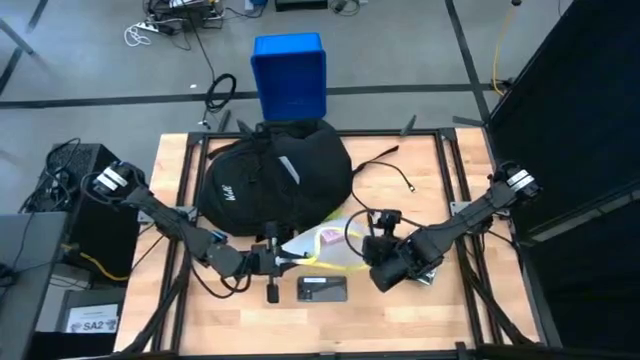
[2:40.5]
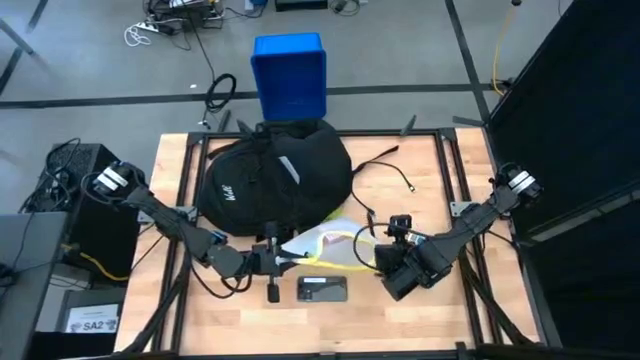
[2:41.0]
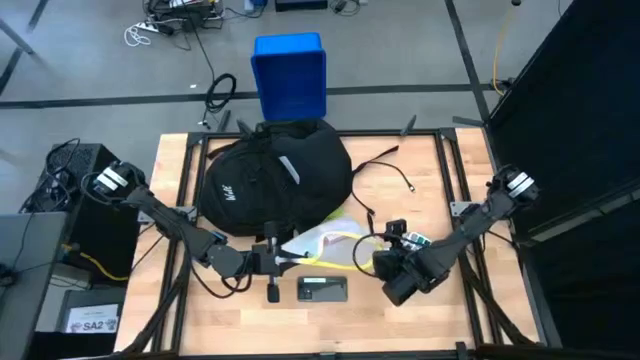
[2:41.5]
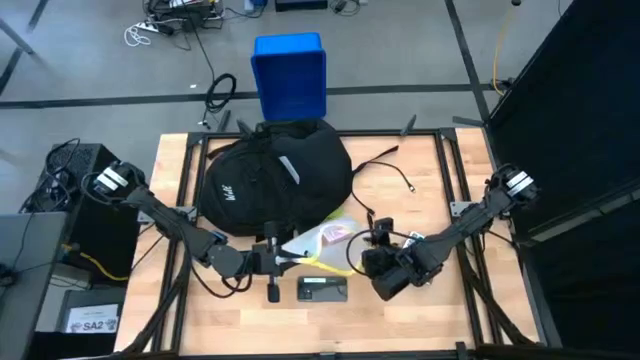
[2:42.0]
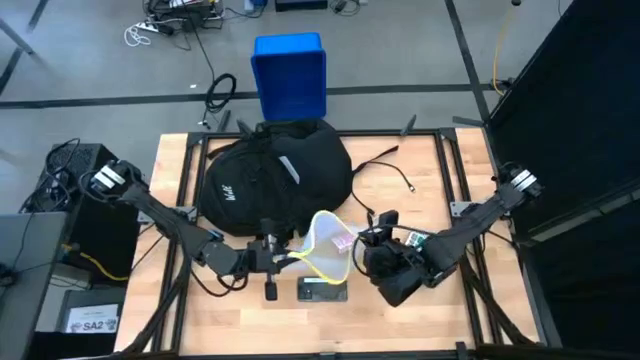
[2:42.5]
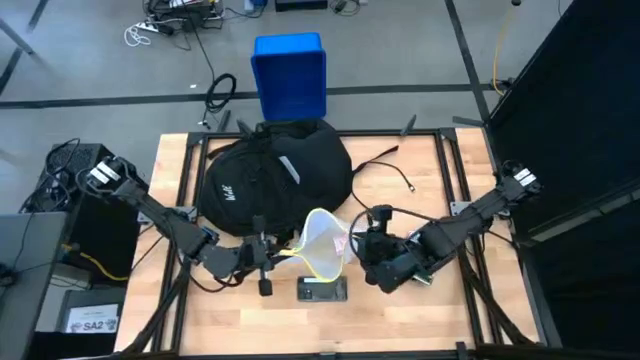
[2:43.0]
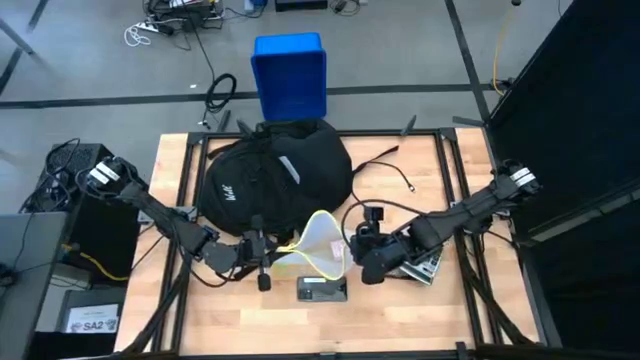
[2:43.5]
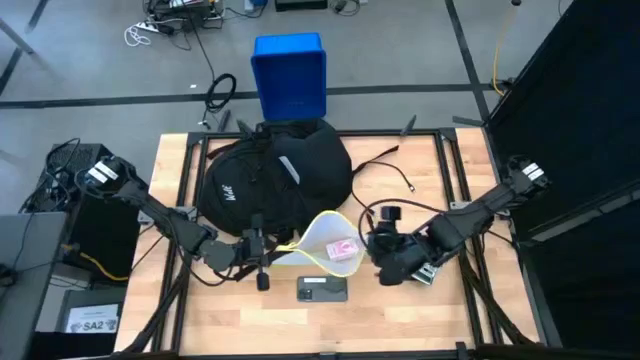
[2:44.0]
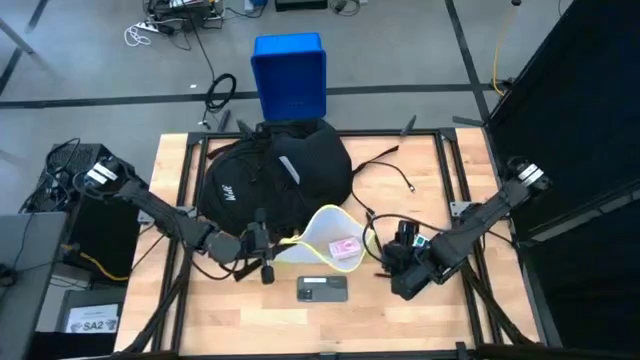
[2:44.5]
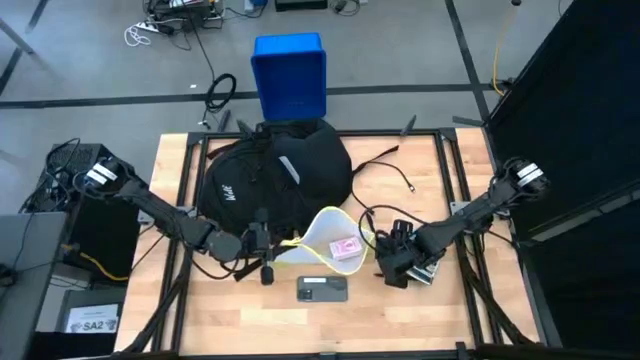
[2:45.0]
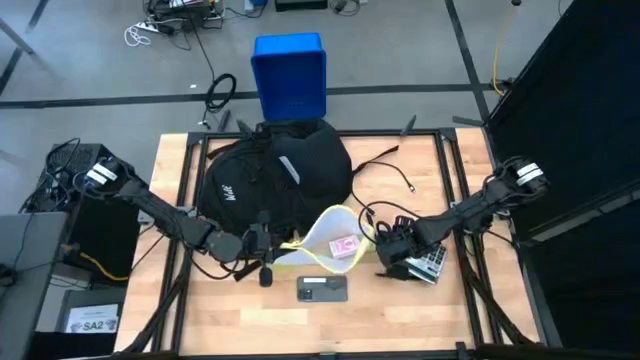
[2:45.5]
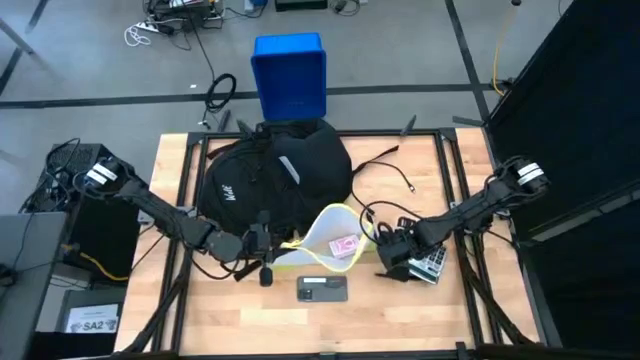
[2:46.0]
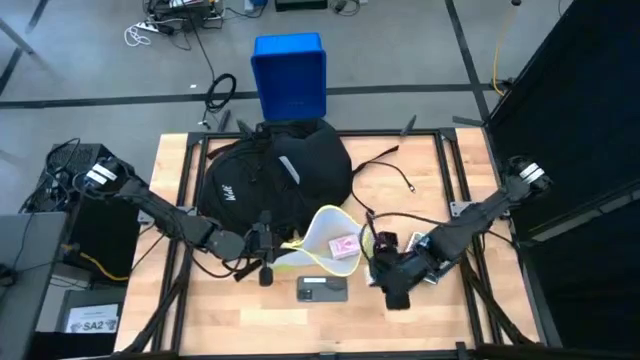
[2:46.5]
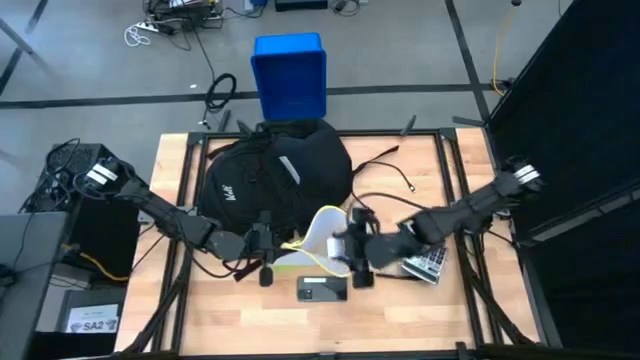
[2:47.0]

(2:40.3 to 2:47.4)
Task: Unpack backpack
Put the charger adapter into the zip bag

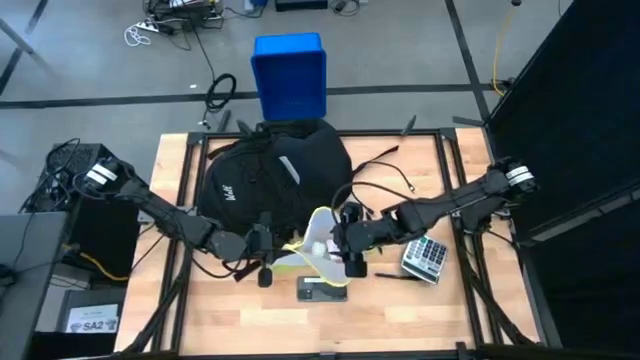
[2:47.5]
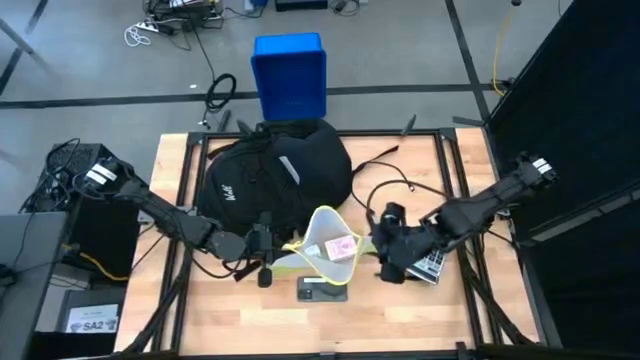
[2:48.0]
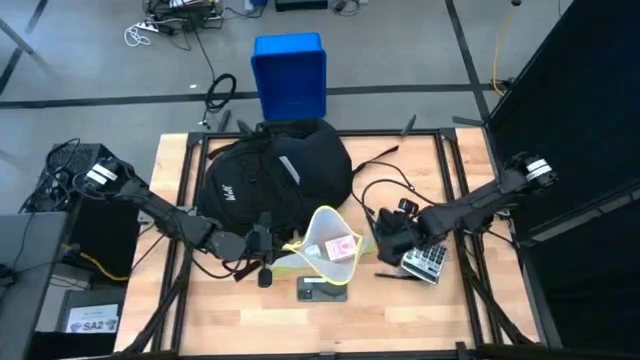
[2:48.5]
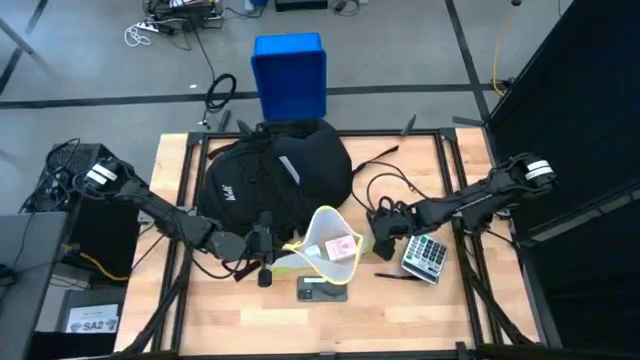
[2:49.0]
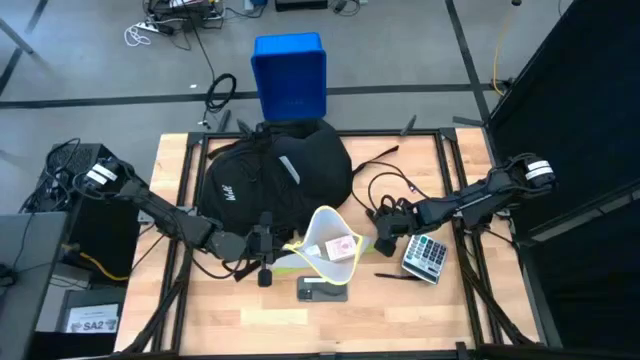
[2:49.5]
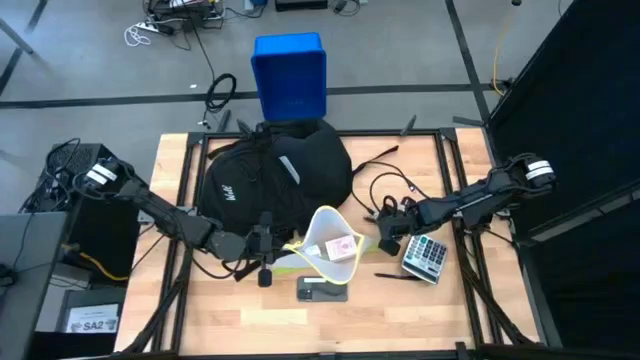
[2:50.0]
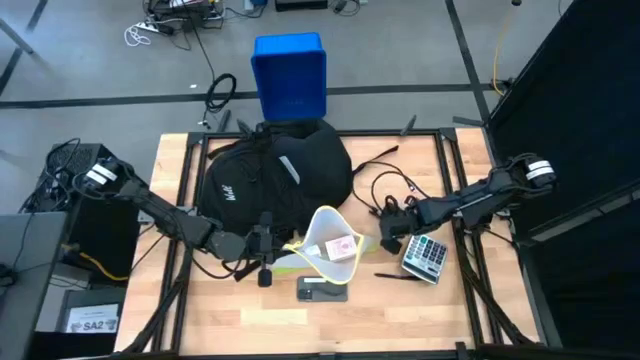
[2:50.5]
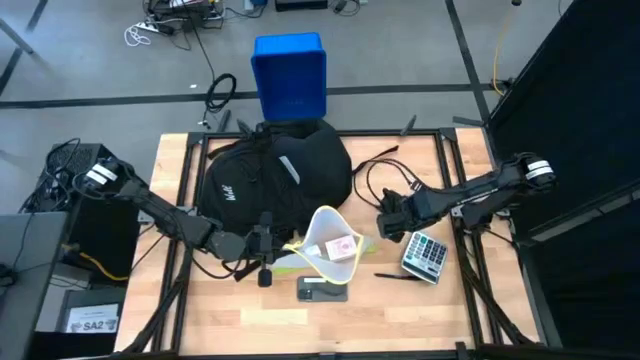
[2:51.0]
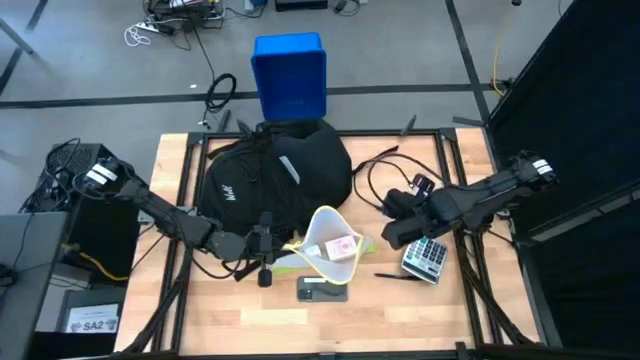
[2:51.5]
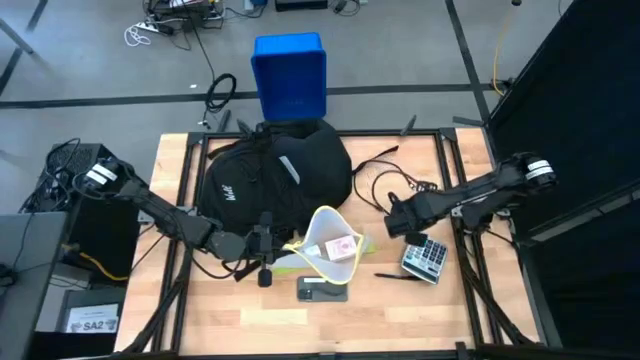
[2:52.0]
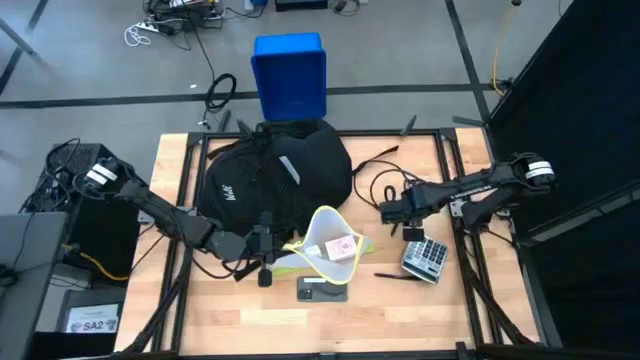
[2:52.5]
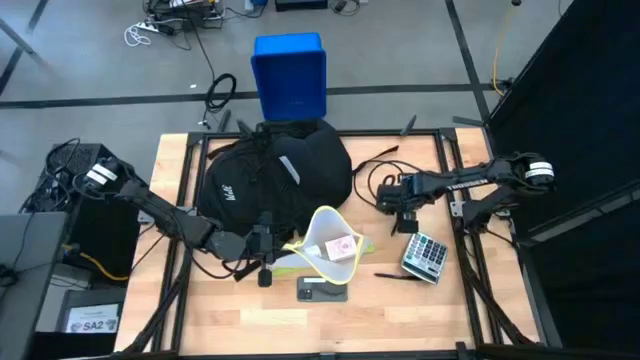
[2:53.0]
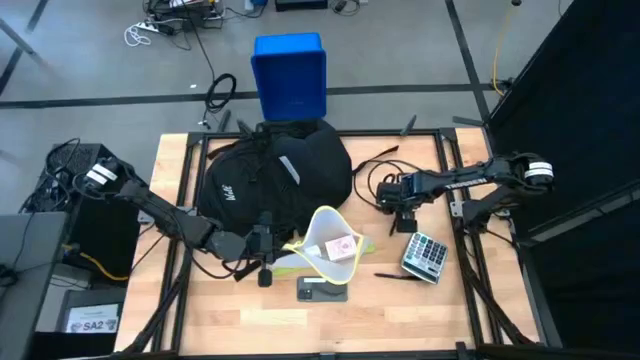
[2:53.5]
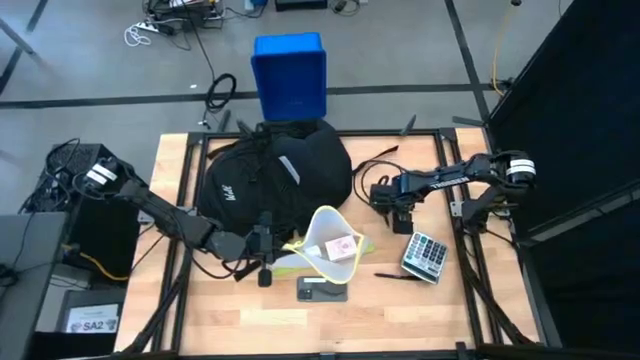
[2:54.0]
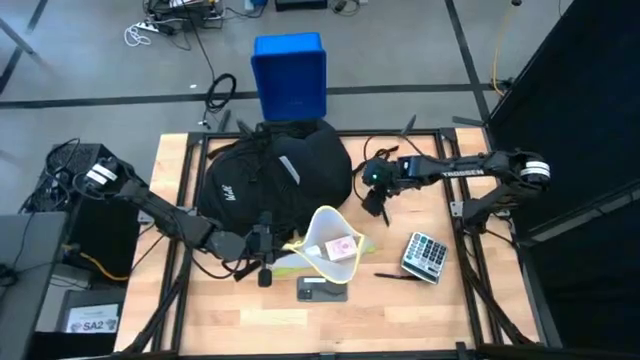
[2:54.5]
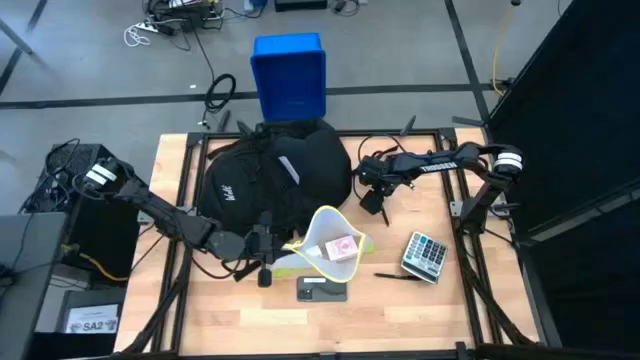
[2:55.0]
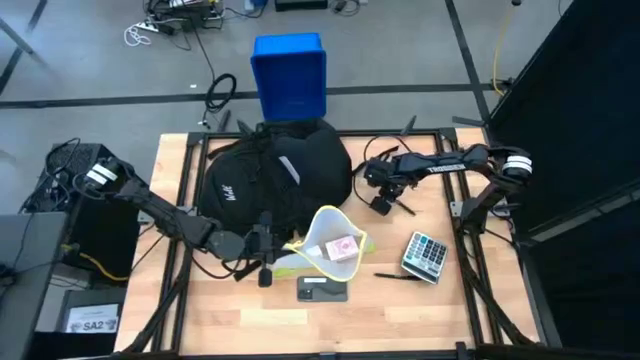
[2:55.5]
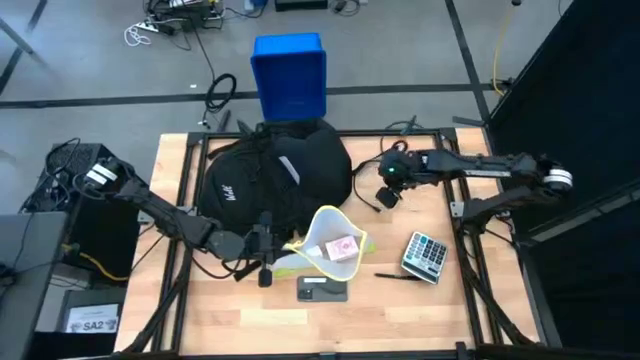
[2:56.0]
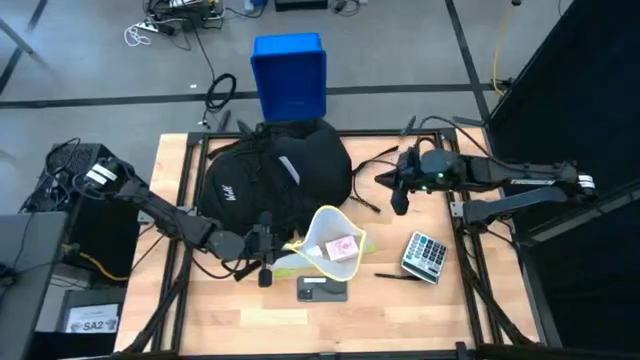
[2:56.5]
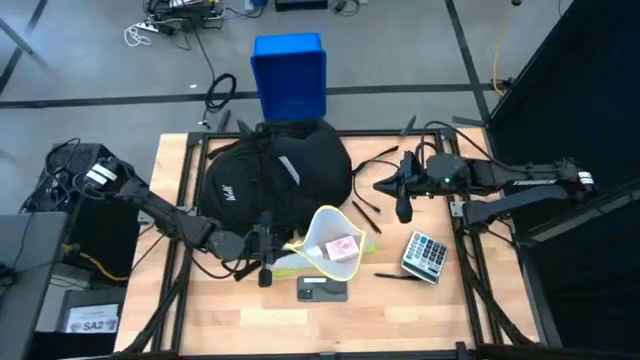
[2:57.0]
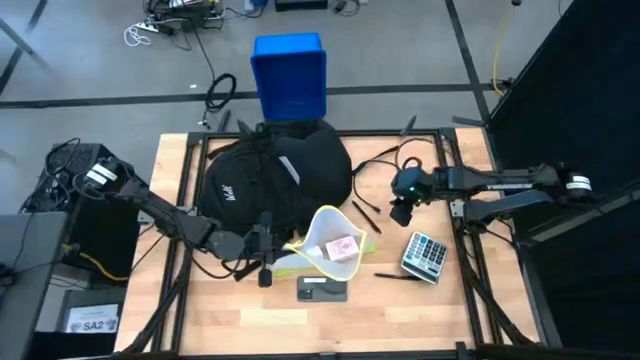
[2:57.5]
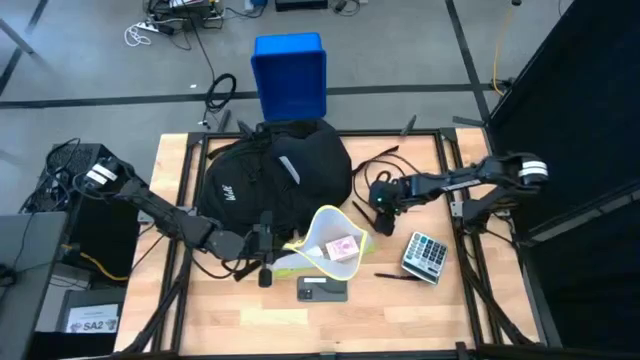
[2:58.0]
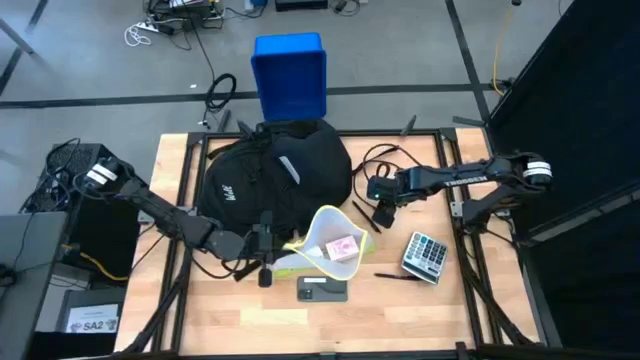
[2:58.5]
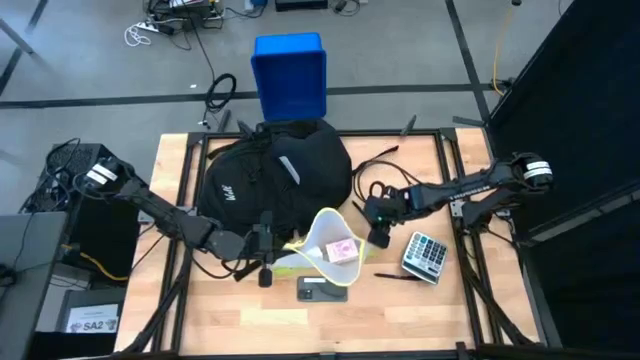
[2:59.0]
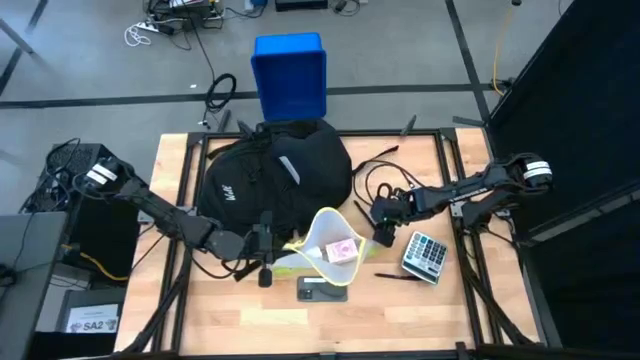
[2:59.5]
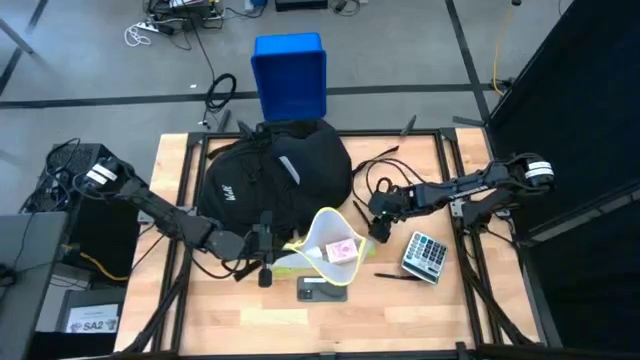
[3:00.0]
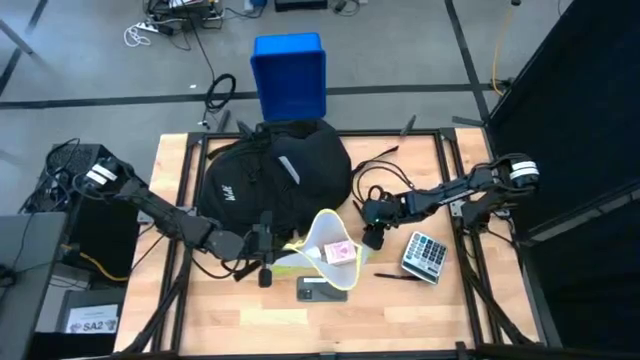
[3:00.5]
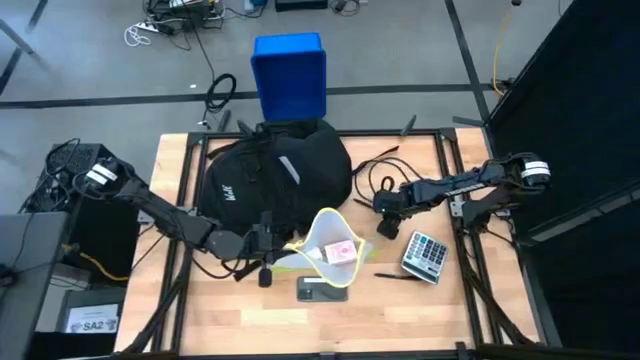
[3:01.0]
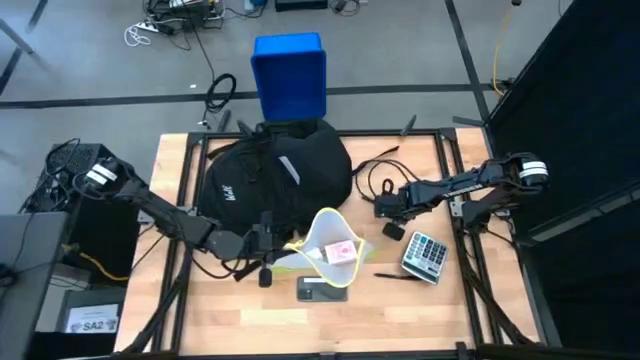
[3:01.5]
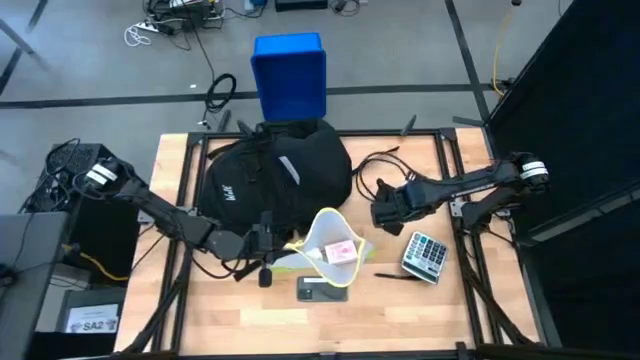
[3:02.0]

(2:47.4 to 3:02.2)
Put the pen into the zip bag
